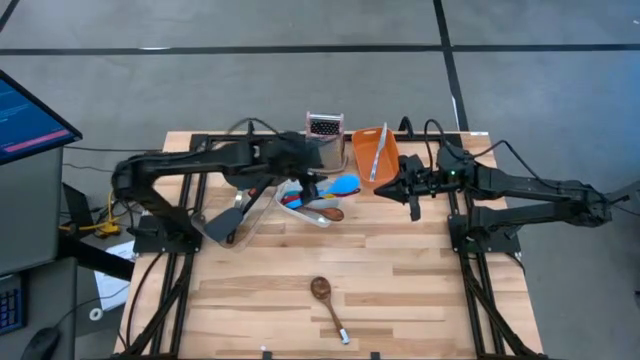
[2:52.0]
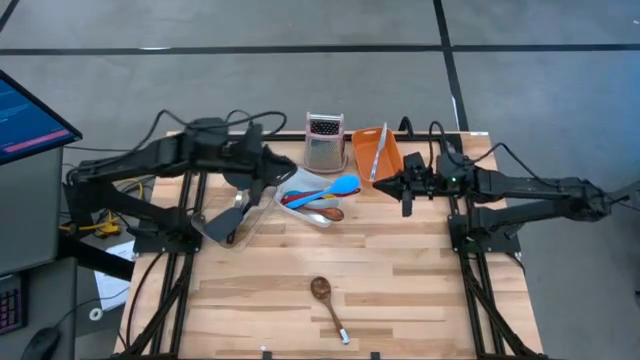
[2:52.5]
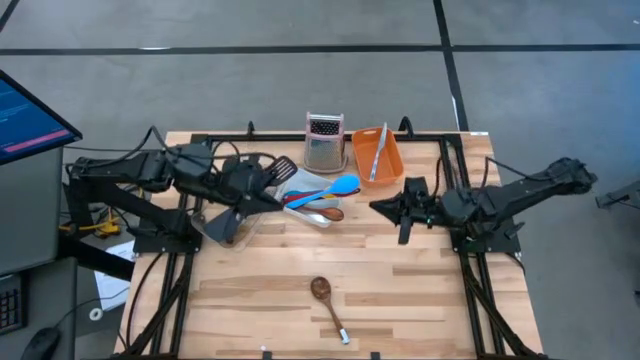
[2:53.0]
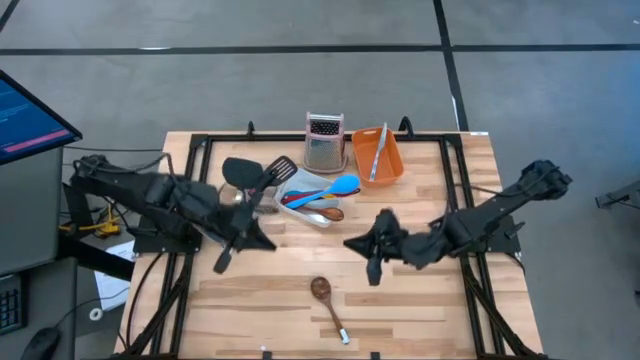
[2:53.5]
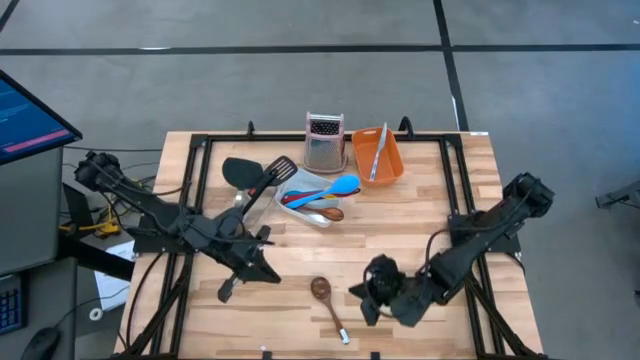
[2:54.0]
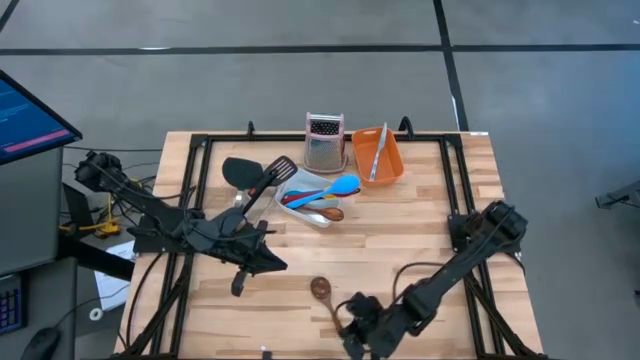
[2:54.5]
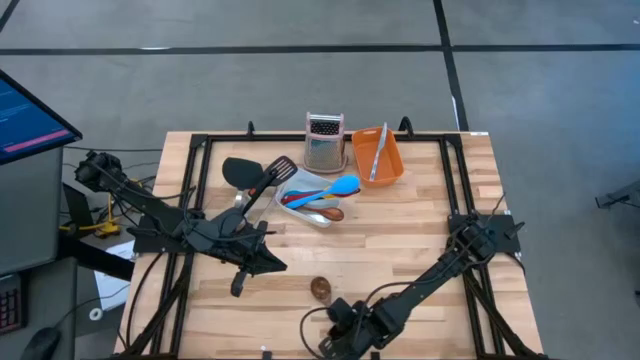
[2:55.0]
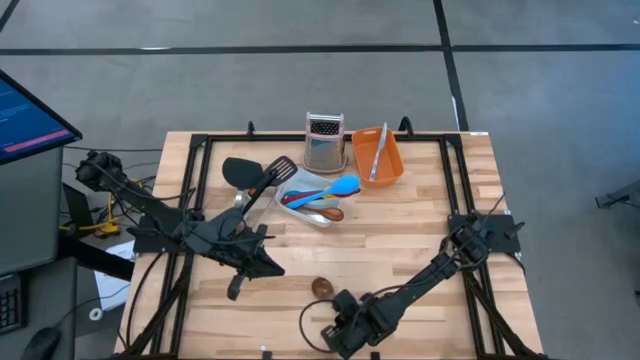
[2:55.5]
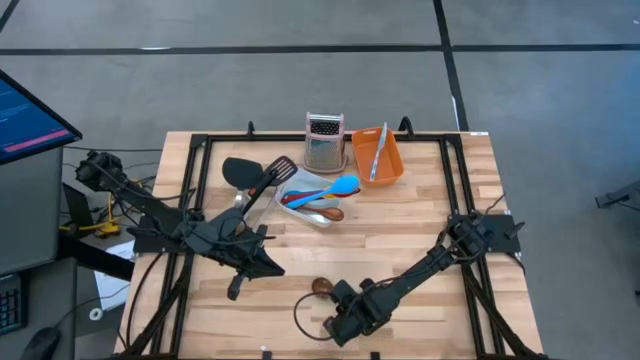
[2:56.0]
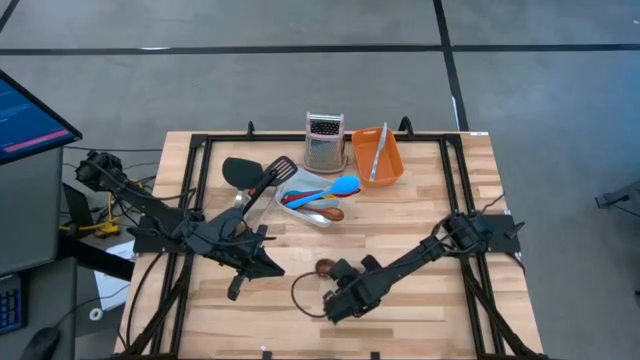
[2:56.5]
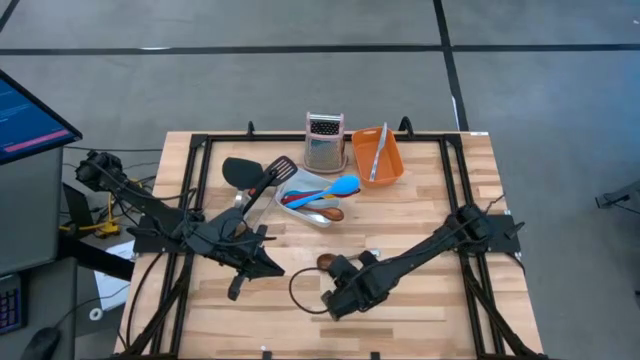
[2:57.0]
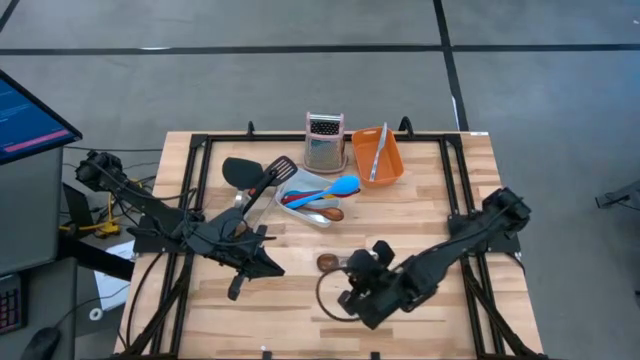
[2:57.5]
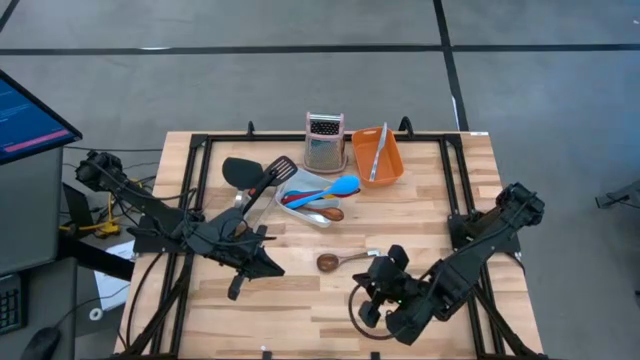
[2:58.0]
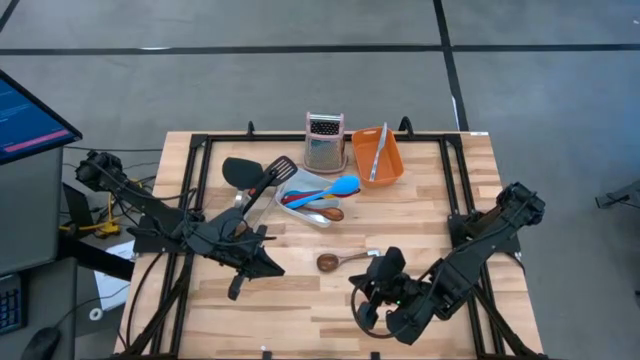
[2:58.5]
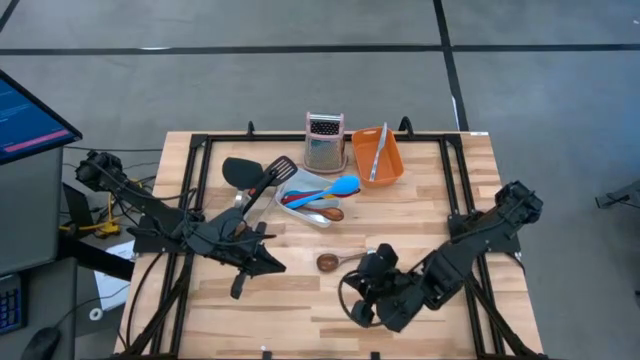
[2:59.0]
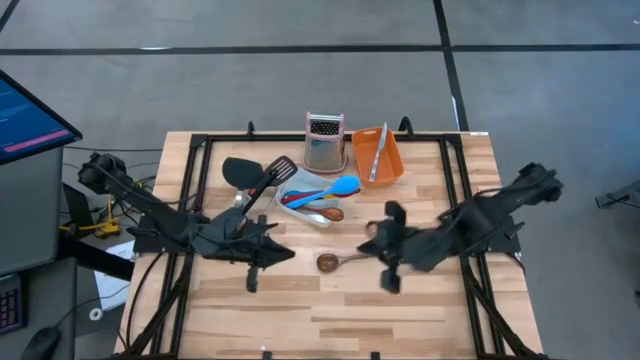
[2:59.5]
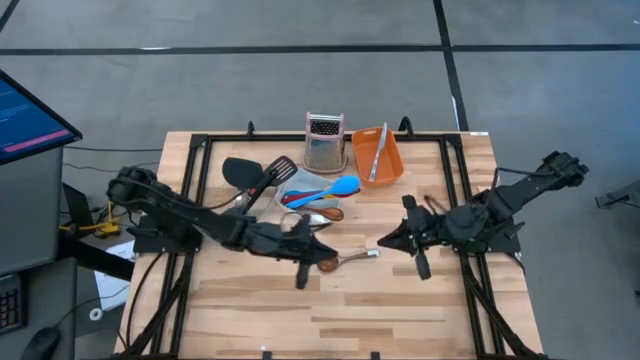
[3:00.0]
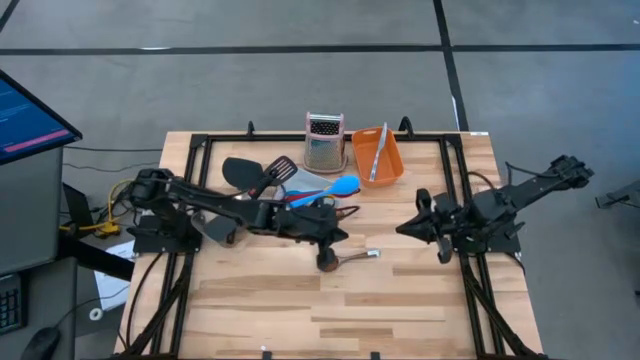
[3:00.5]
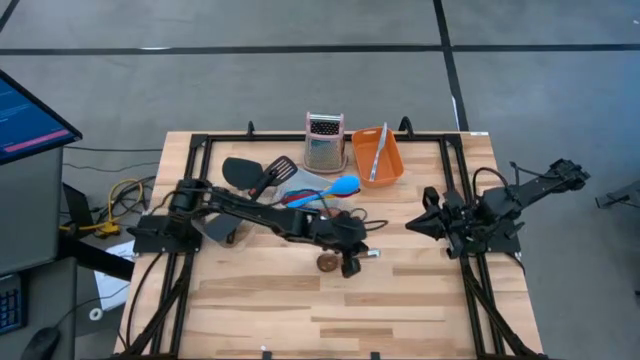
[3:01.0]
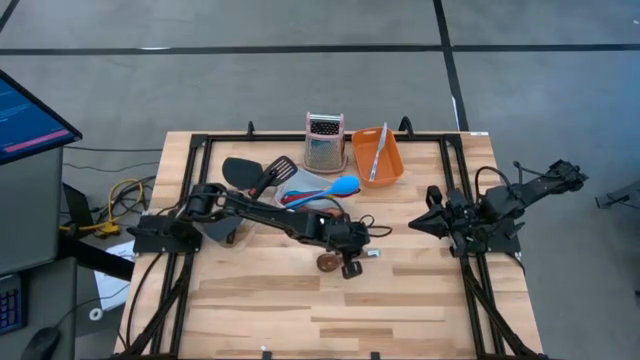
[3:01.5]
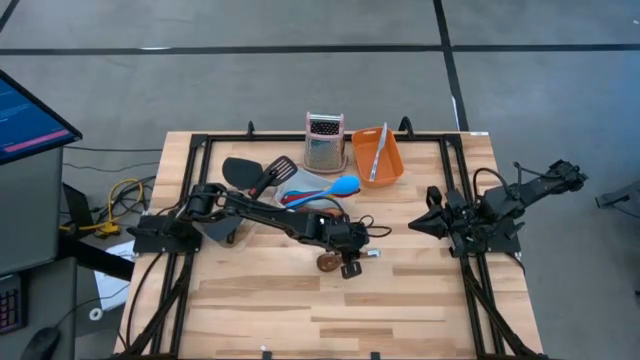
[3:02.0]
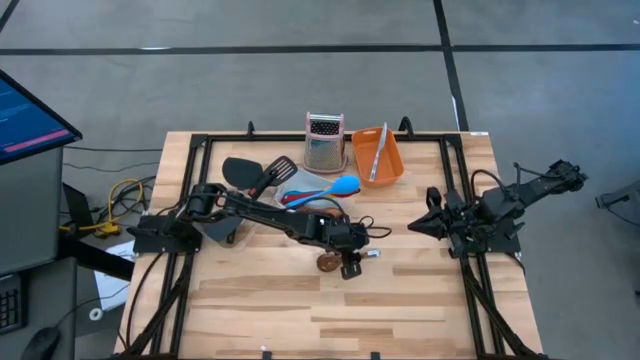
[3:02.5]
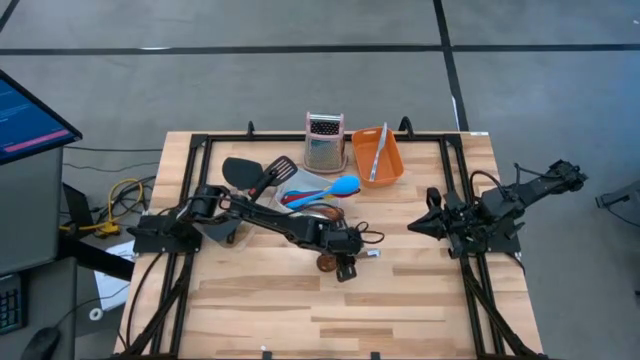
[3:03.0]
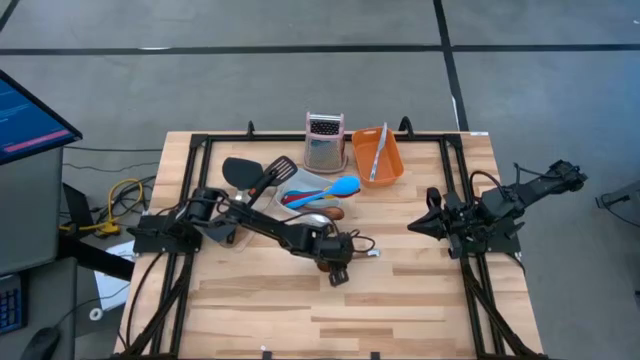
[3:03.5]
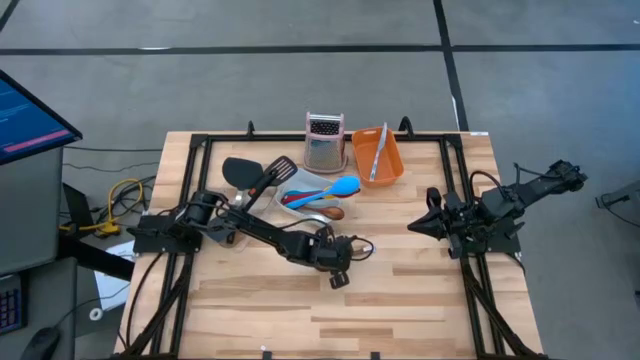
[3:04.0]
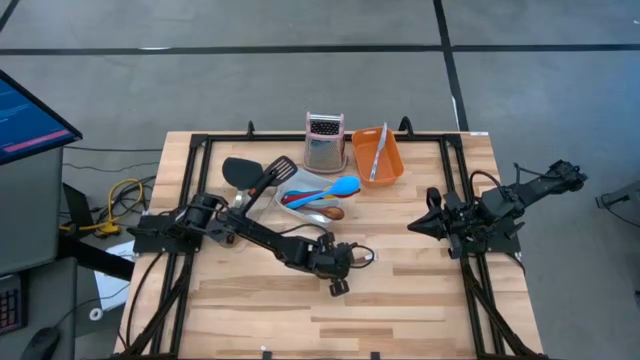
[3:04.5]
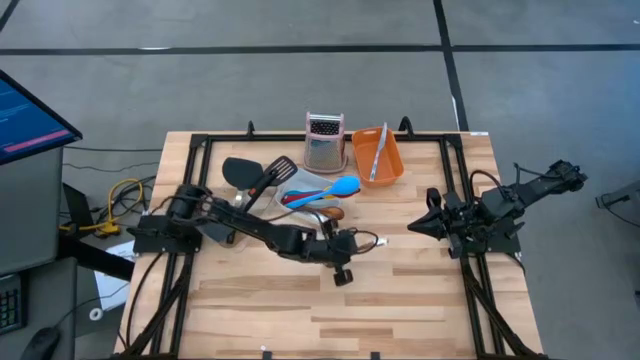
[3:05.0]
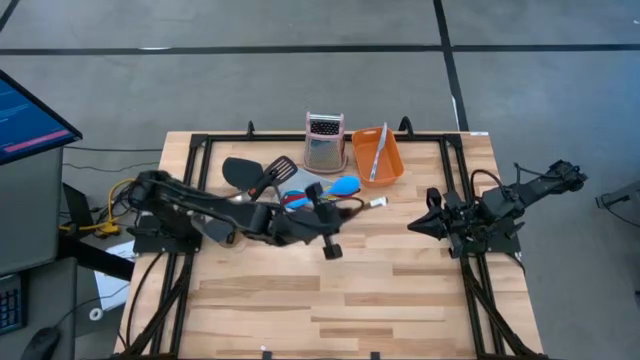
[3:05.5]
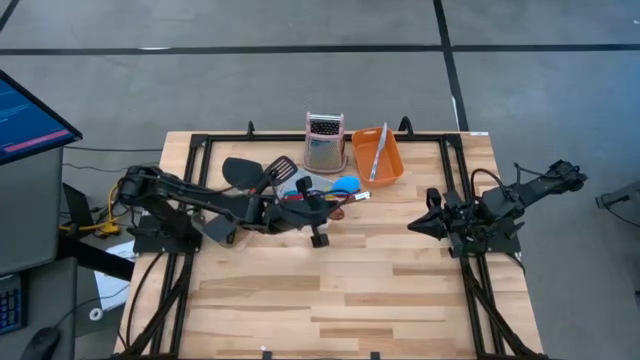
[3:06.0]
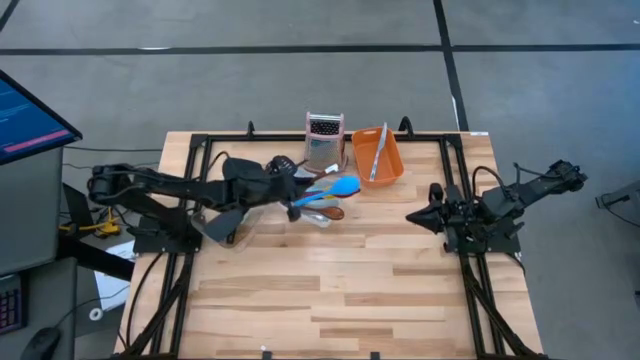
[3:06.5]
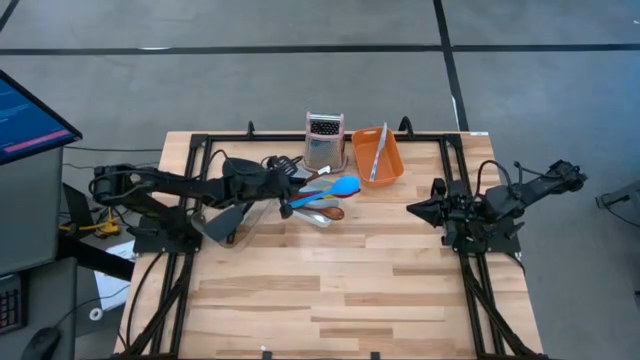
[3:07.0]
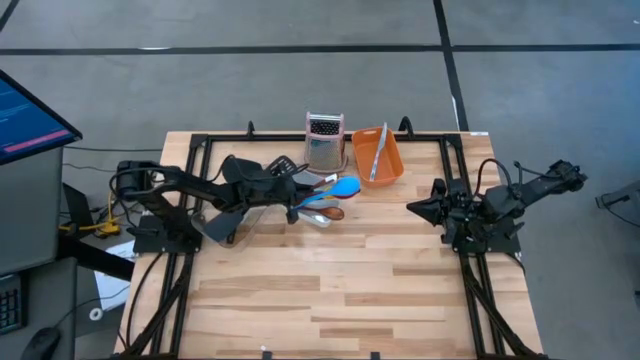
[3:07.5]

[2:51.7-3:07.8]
Task: Pick & Place Kitchen Items
Put the wooden spoon into the white bin

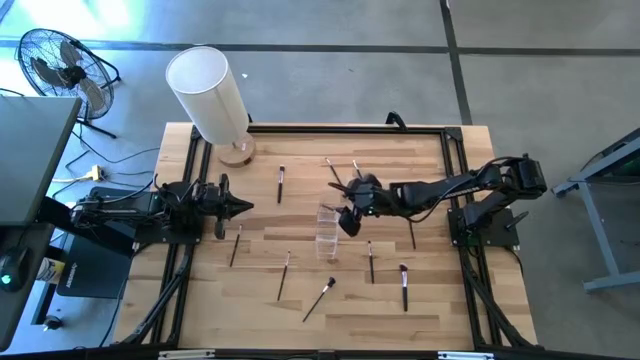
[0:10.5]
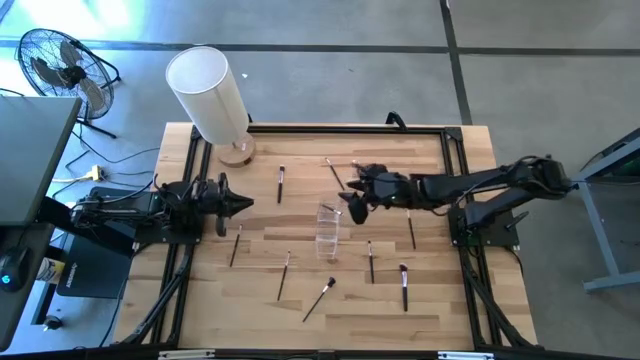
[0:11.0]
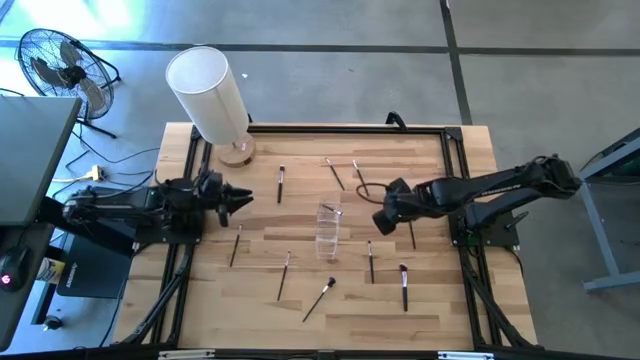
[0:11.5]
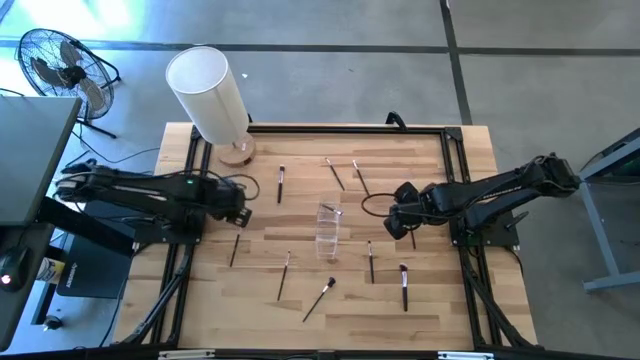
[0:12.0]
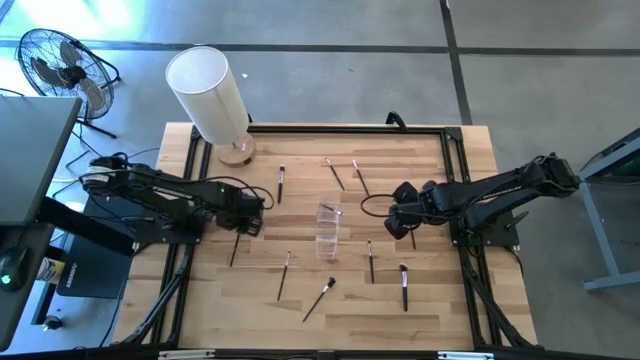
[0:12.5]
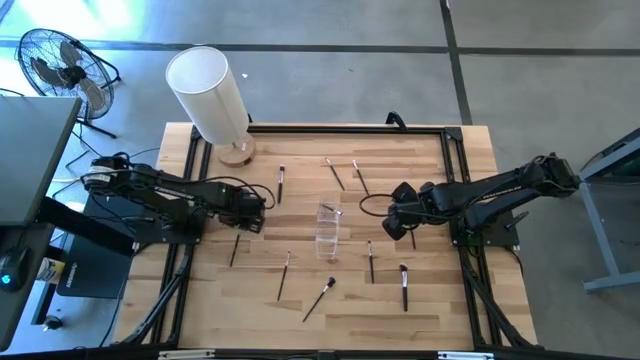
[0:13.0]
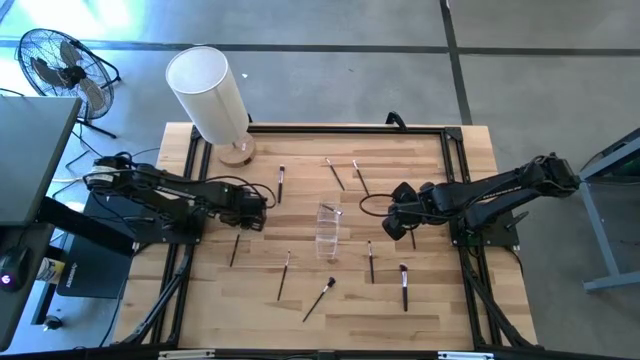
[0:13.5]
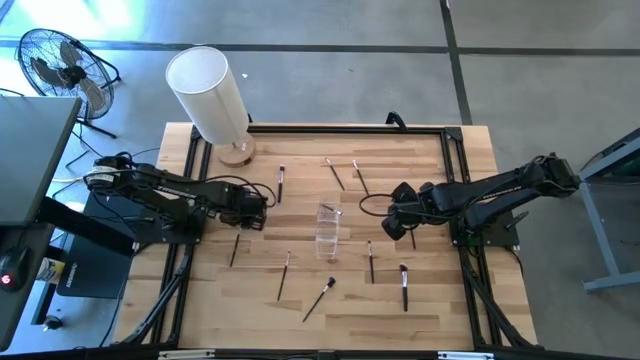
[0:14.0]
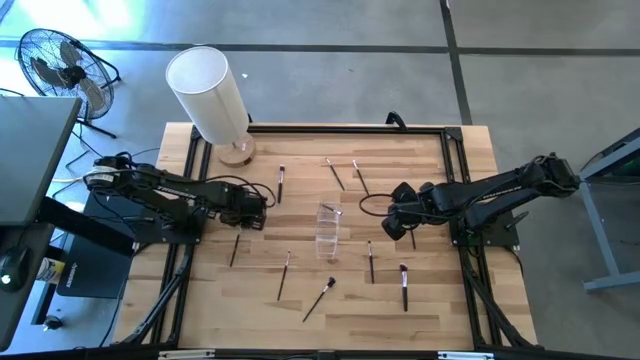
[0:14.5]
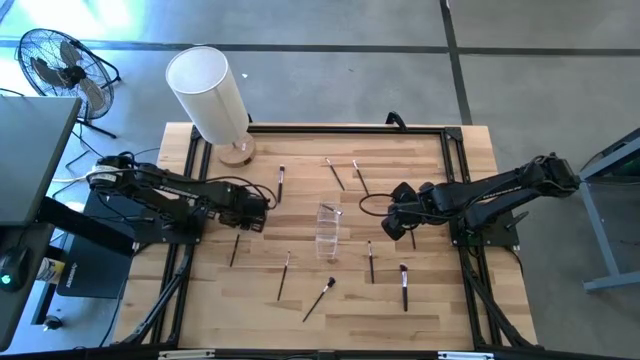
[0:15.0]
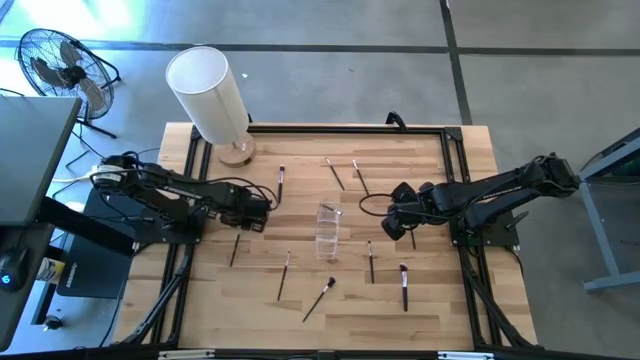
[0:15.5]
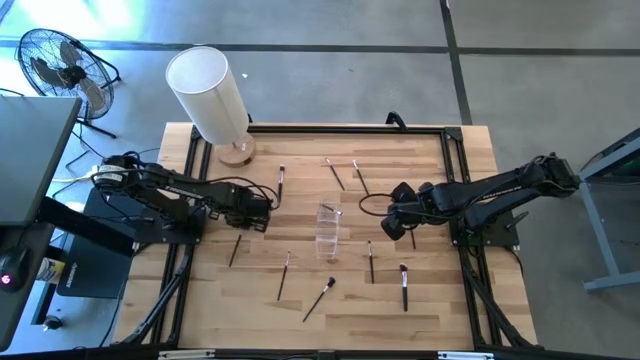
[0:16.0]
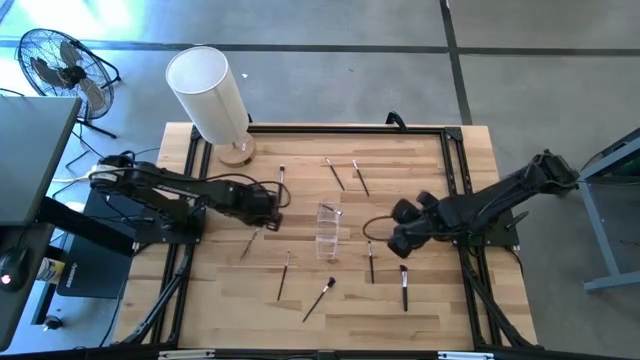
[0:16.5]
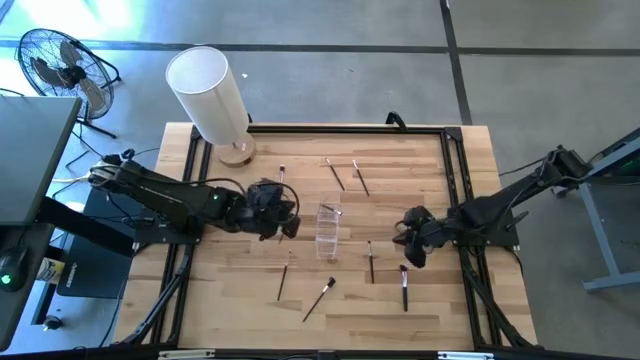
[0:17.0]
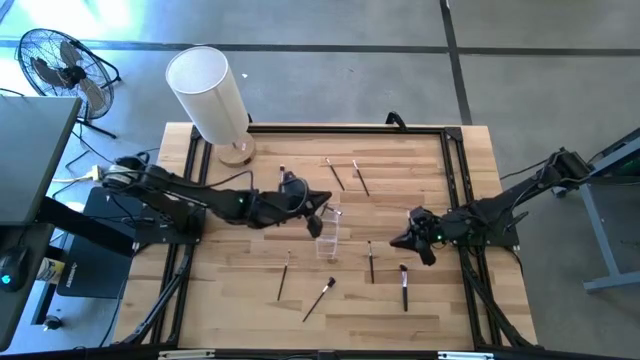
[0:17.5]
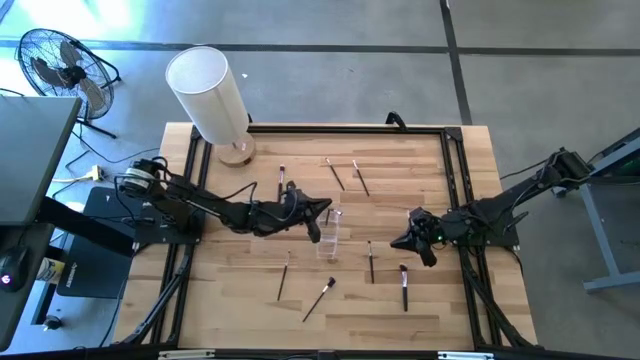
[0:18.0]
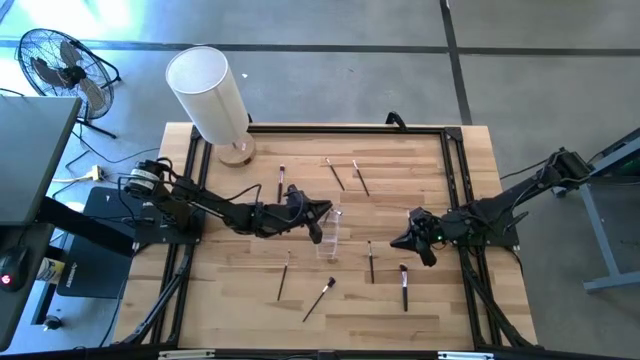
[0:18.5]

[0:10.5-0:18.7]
Task: Pick & Place Makeup Brushes
Put the eyeshadow brush into the transparent organizer
